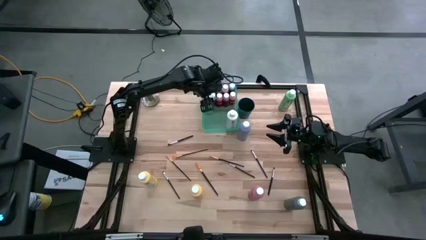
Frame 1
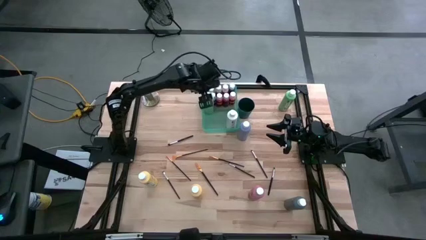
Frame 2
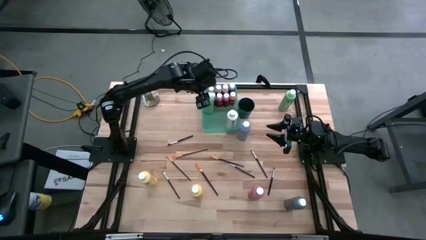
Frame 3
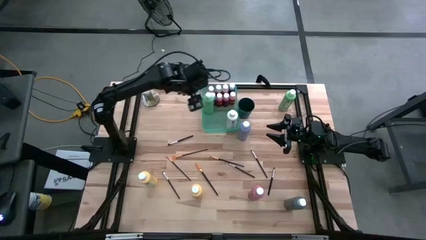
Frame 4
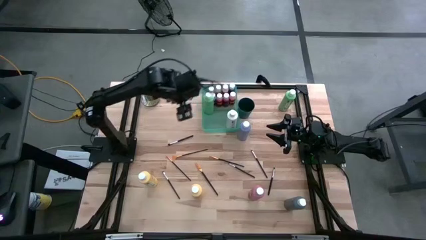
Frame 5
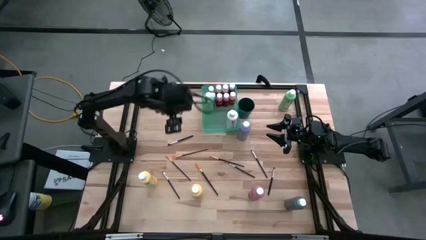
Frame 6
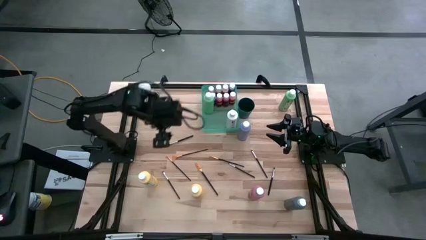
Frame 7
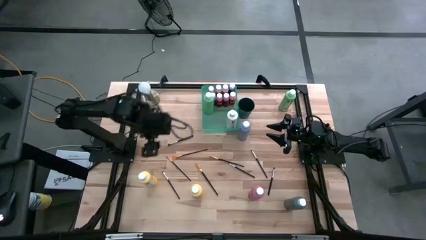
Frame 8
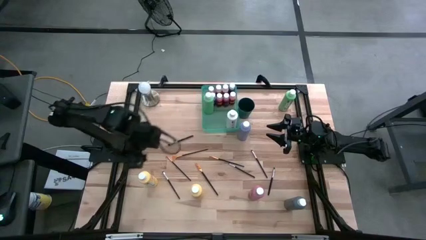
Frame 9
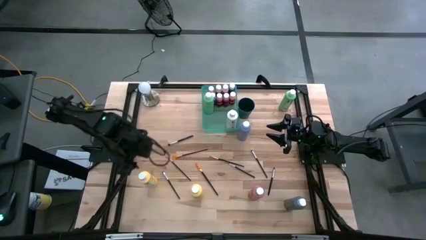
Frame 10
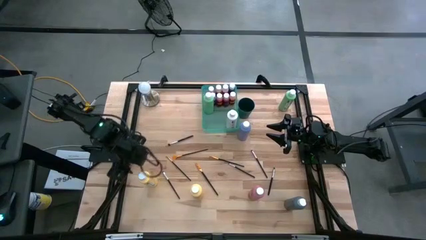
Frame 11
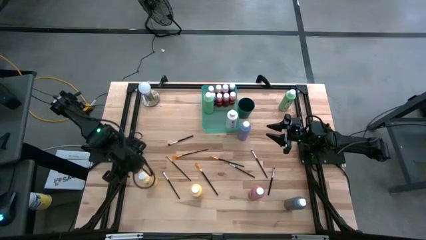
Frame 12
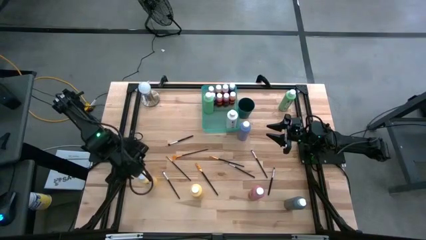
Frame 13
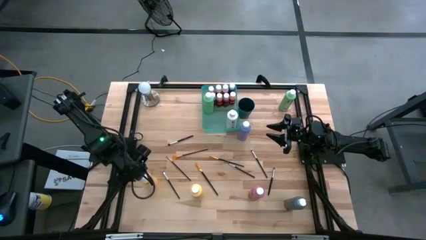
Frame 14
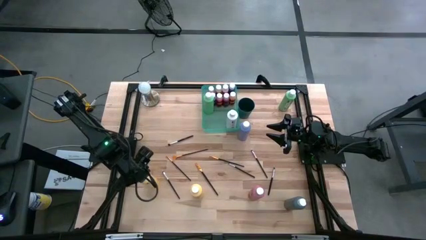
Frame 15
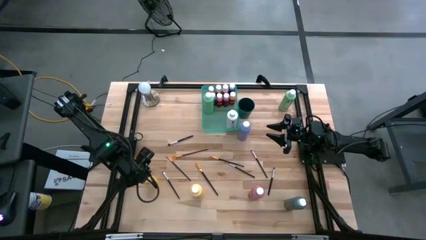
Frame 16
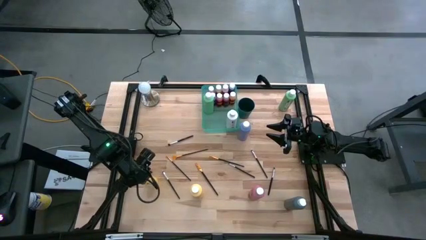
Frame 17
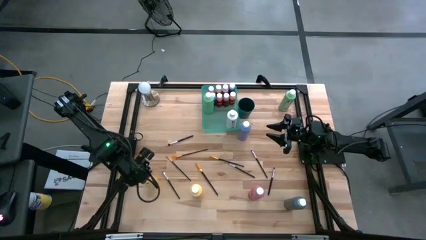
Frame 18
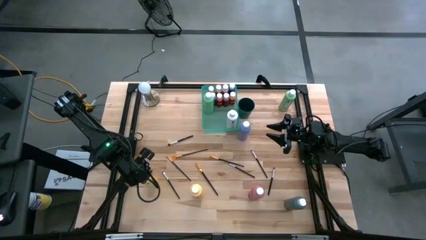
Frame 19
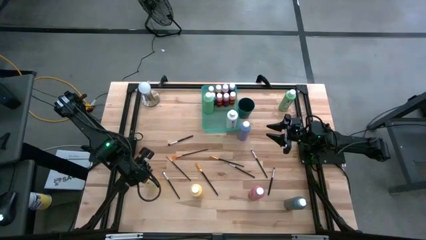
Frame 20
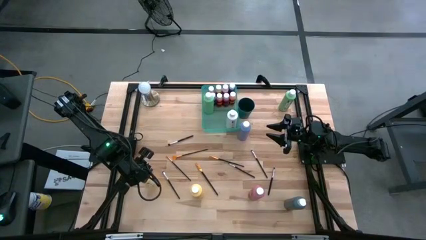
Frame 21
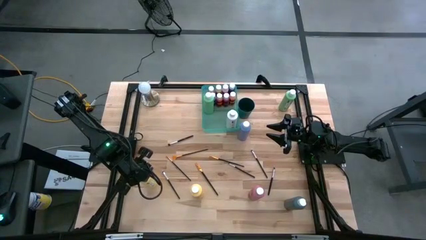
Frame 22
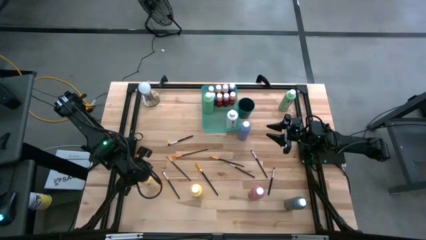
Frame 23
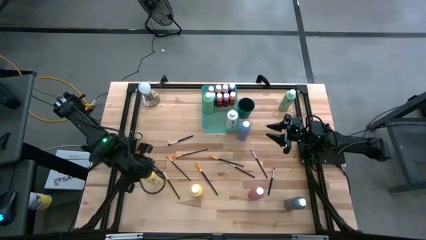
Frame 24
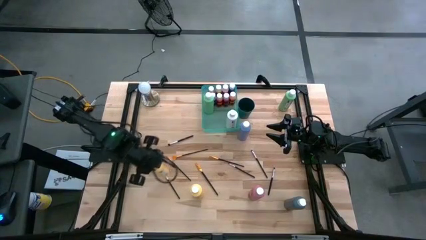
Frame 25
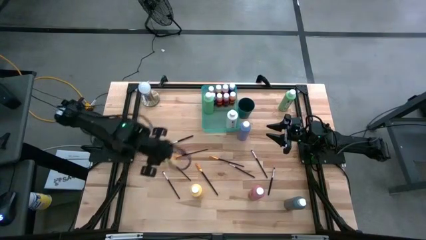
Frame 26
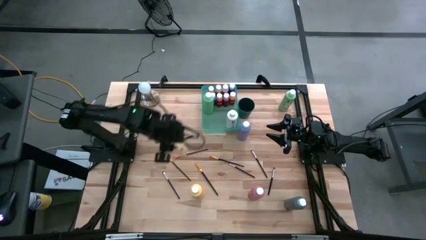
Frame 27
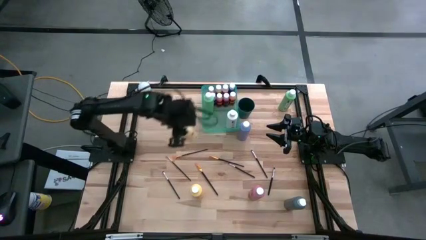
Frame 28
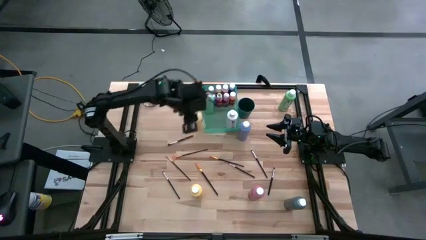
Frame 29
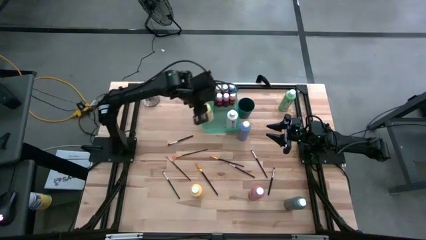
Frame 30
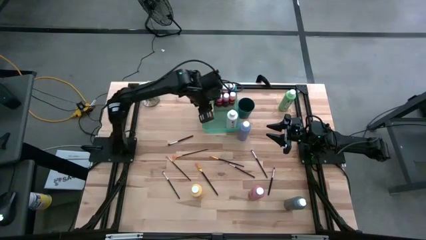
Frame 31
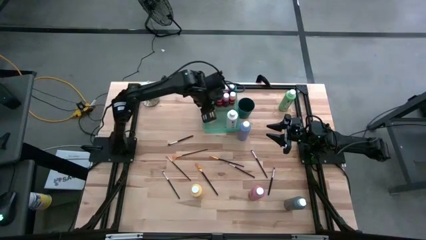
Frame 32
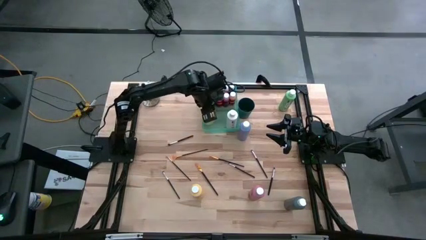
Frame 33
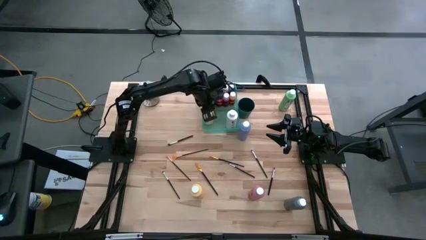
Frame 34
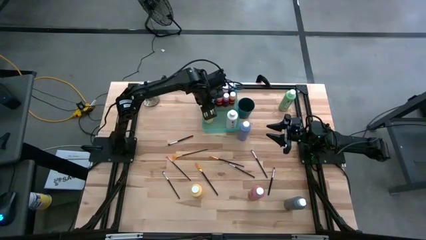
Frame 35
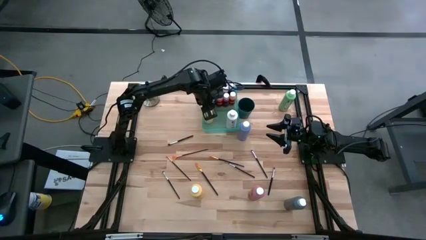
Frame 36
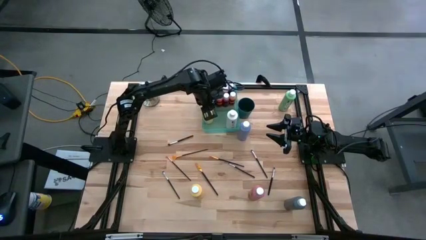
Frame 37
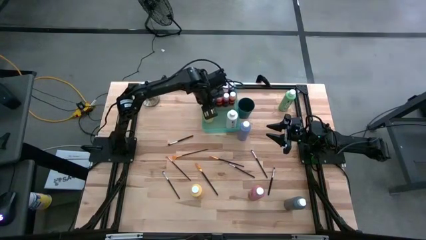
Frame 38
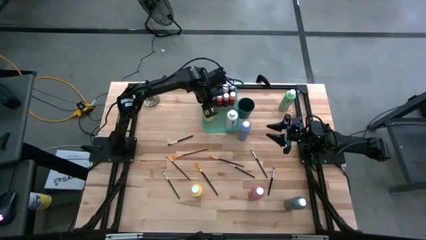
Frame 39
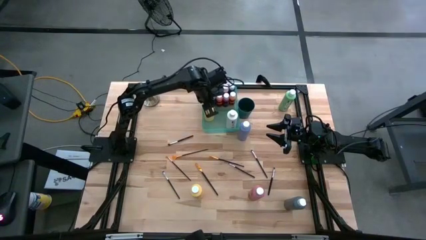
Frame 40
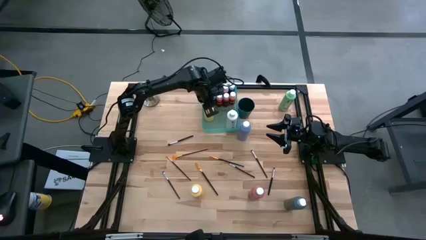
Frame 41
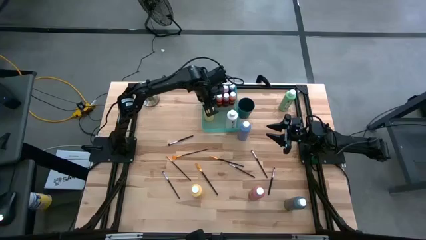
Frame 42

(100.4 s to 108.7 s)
Task: Pick & Place Paint Supplies
Put the left yellow paint bottle into the green bin

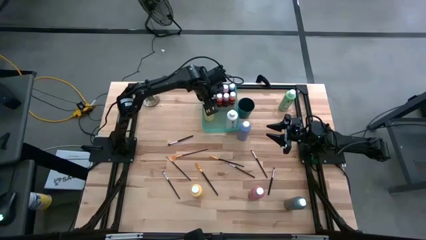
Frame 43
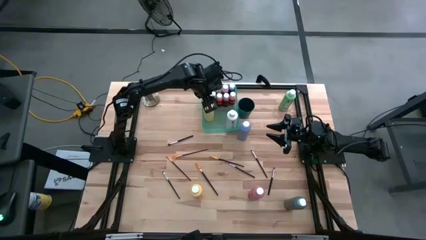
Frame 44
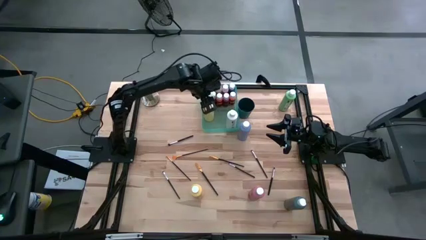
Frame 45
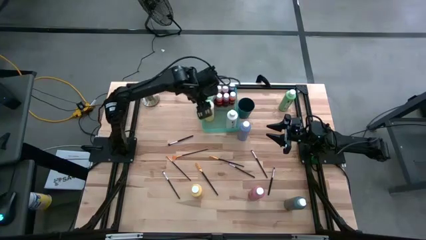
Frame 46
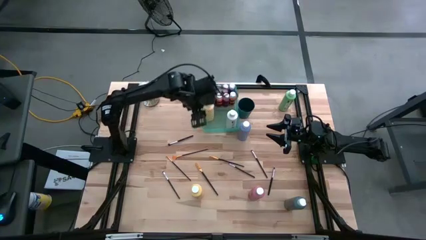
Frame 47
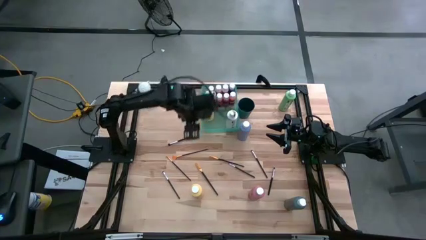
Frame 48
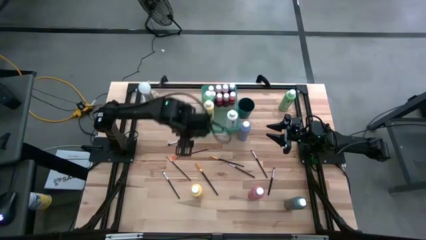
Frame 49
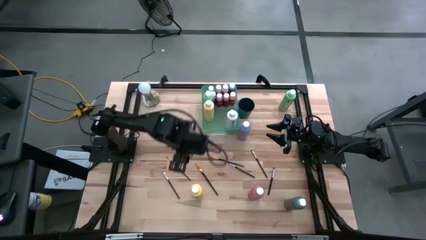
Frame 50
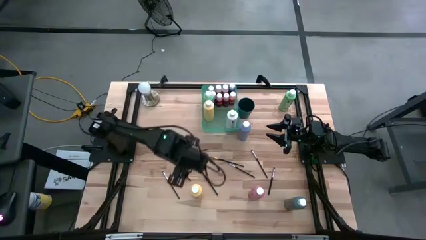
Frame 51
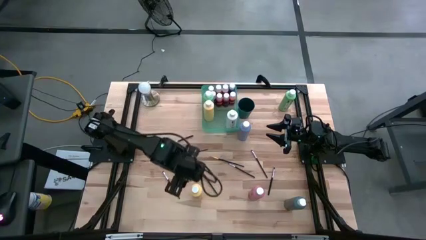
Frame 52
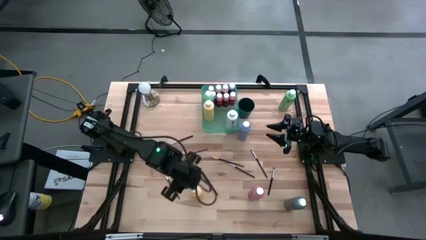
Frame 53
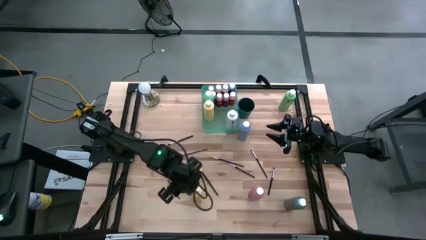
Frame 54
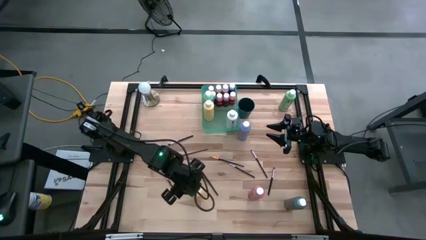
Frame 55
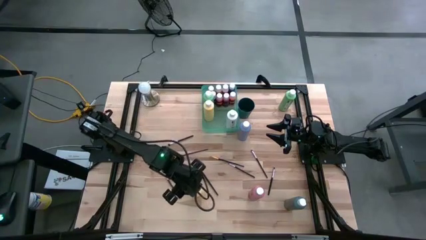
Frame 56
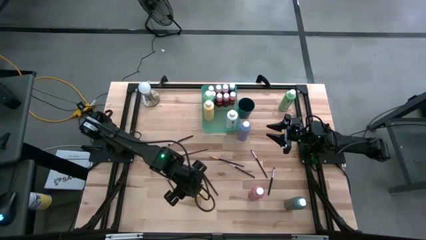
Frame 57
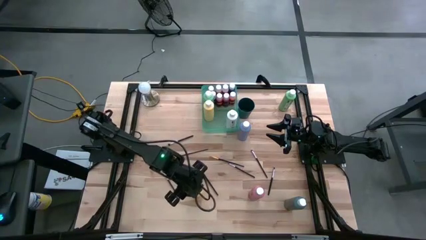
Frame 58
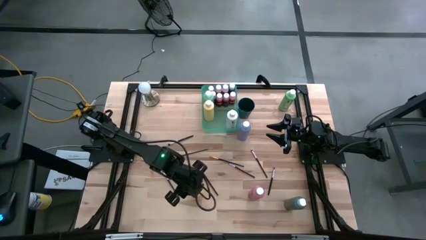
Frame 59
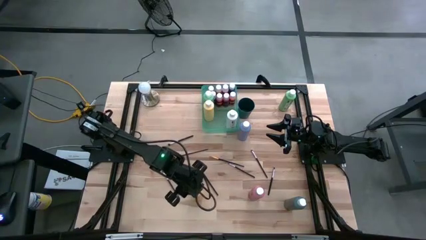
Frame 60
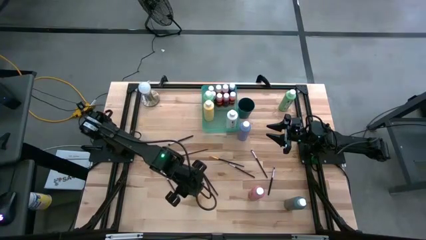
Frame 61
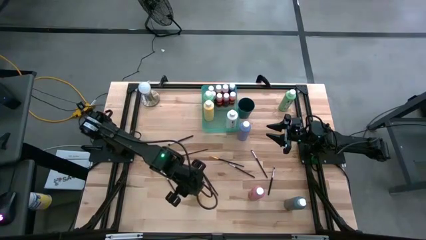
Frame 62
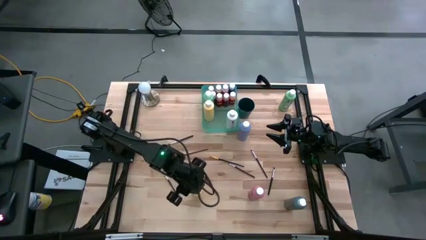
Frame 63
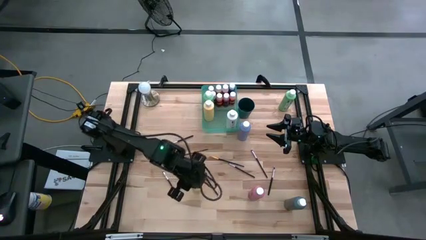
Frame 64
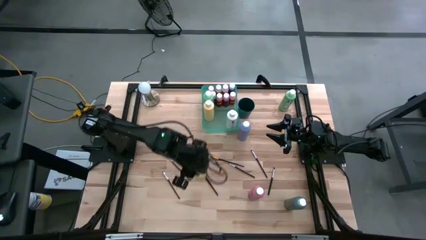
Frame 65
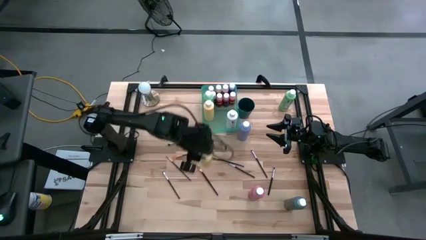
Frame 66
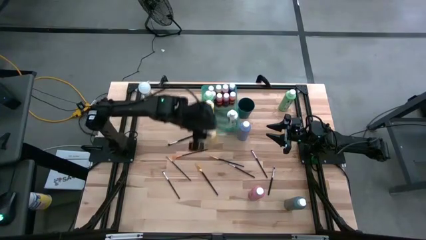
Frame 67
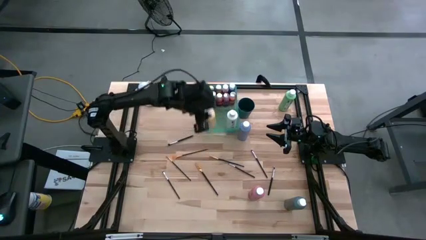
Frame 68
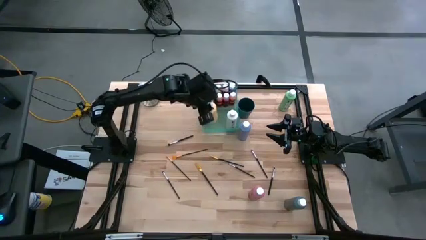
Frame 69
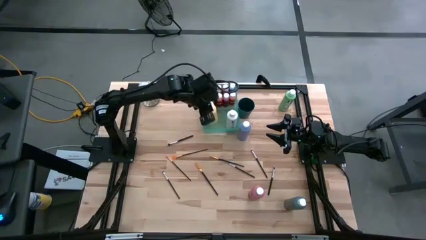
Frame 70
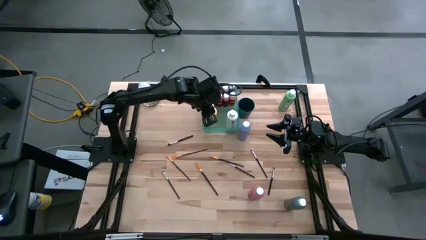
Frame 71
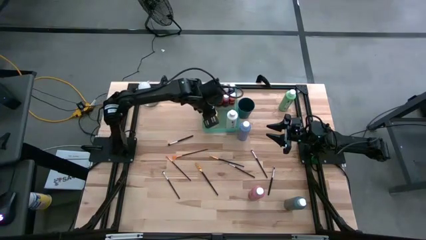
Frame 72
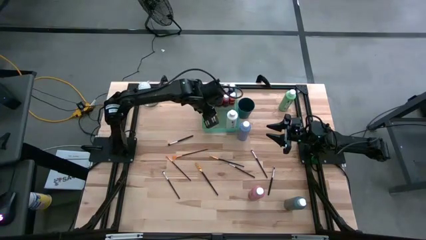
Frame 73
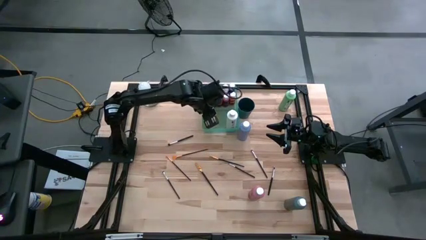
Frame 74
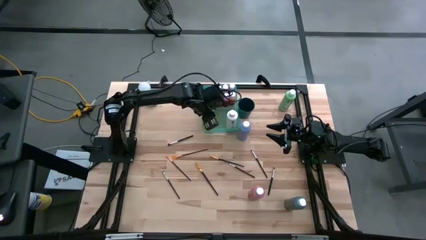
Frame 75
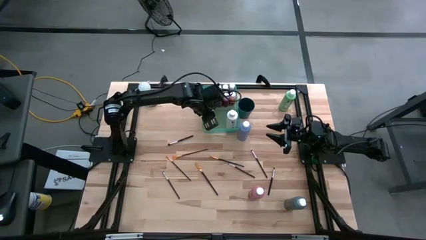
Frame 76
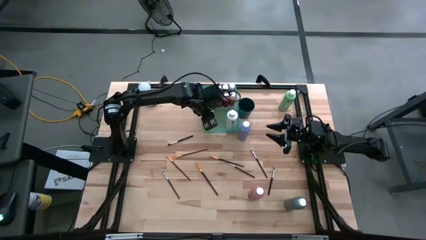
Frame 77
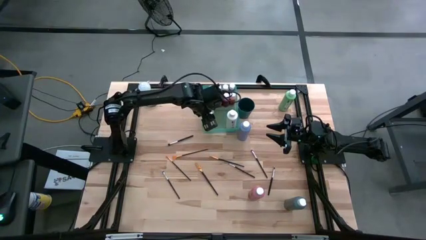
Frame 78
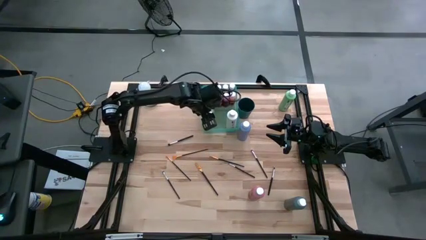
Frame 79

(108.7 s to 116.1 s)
Put the yellow paint bottle into the green bin

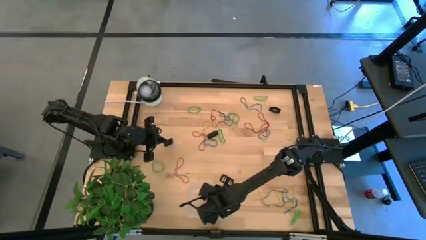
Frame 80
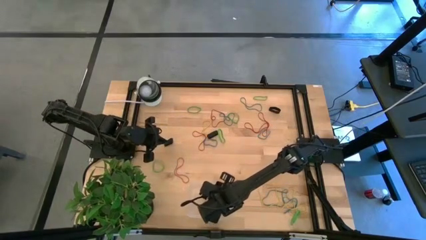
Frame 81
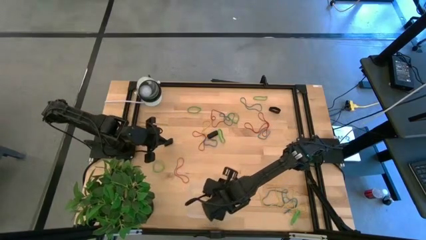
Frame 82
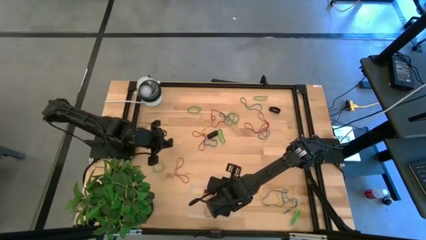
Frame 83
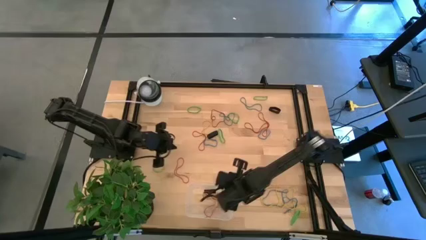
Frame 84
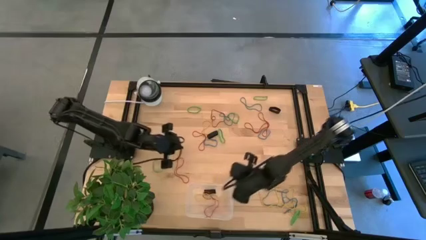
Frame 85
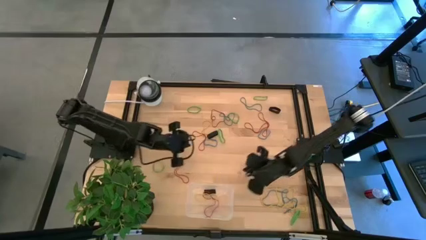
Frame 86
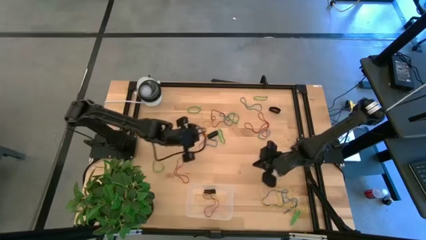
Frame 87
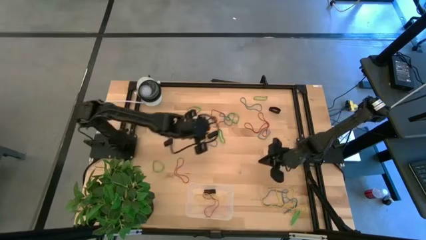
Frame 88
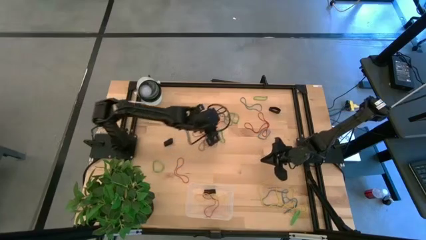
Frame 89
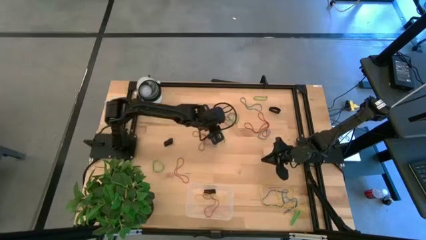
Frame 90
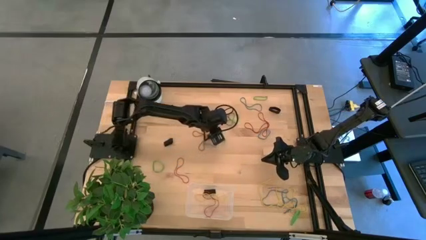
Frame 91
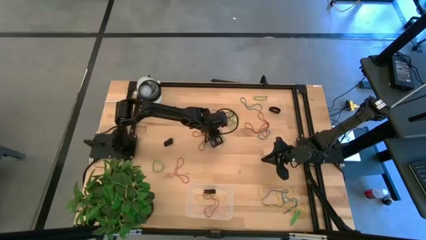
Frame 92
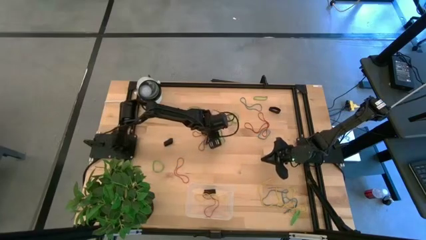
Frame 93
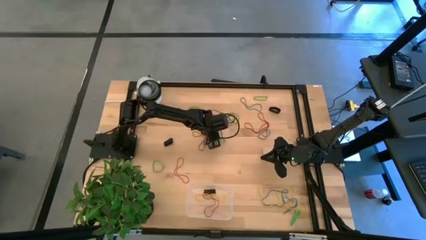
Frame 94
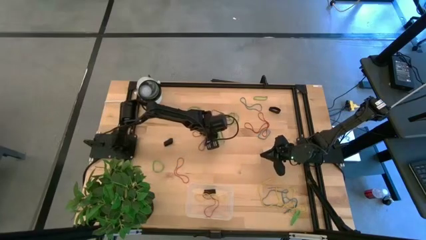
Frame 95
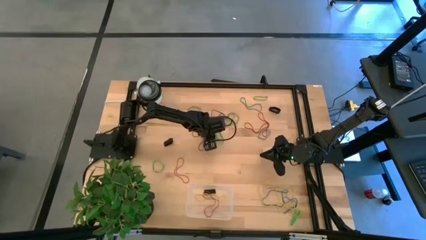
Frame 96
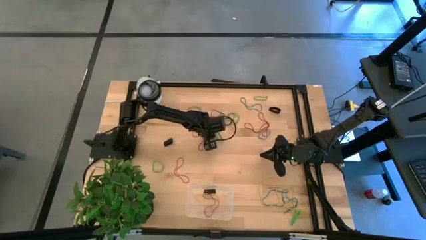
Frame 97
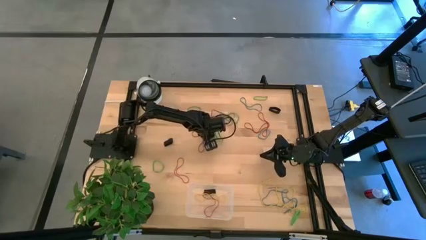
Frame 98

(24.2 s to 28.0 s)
Task: Pick and place rubber bands into bin
Put the black rubber band into the transparent bin
